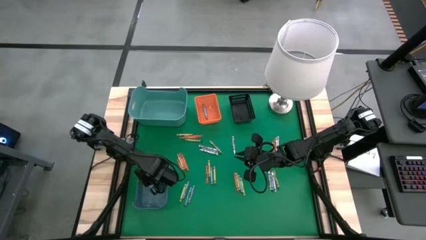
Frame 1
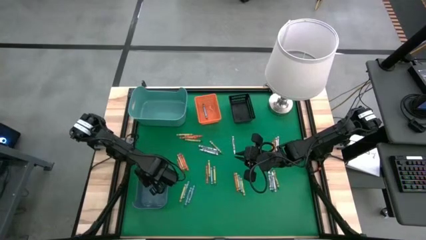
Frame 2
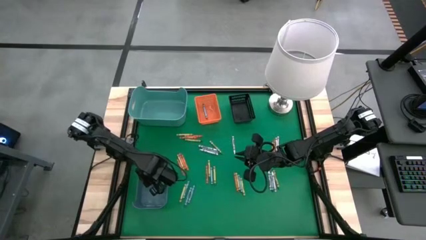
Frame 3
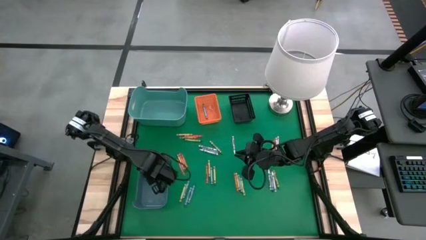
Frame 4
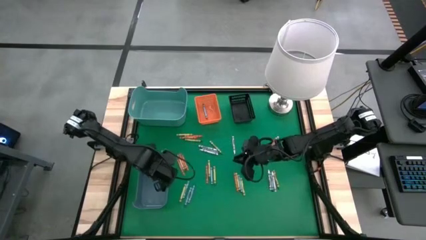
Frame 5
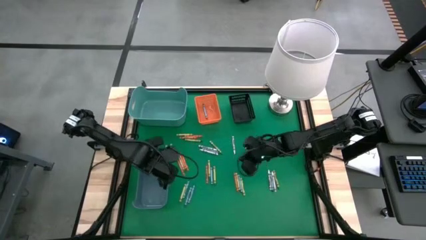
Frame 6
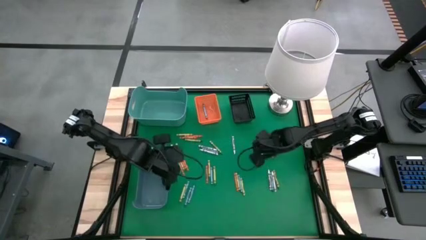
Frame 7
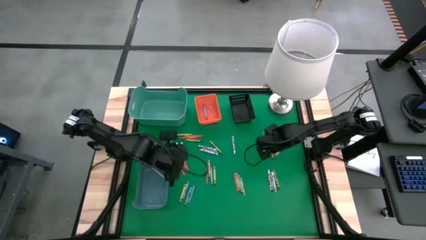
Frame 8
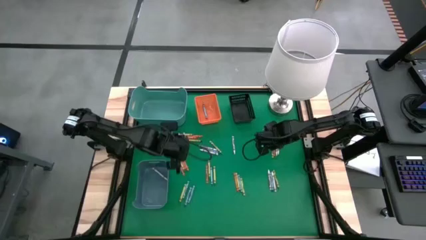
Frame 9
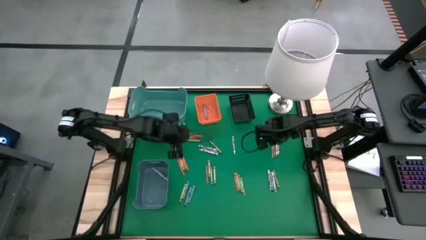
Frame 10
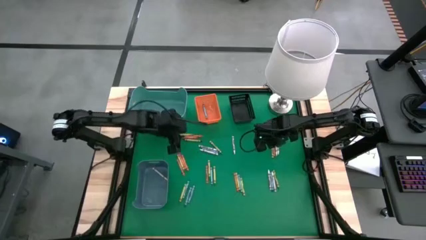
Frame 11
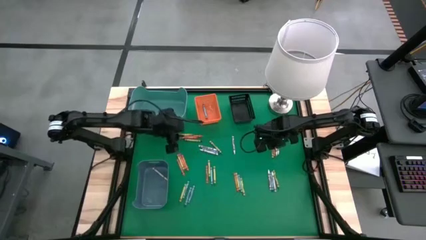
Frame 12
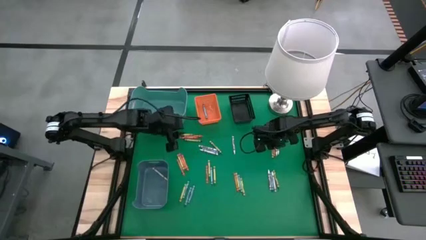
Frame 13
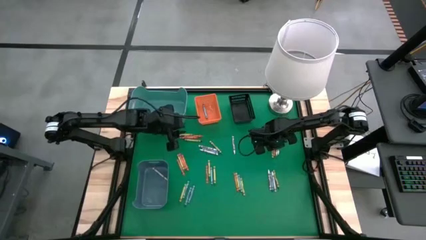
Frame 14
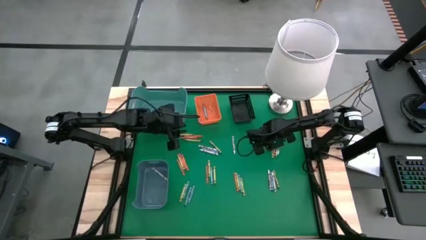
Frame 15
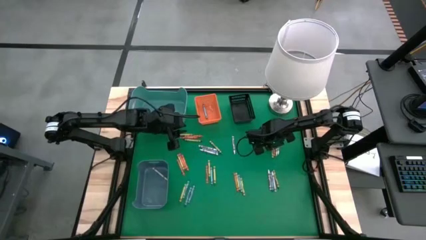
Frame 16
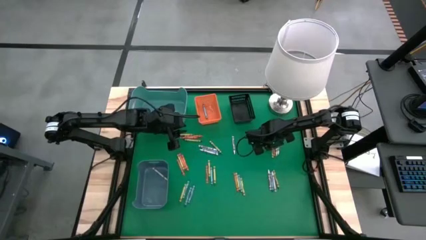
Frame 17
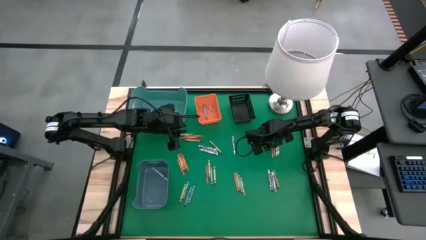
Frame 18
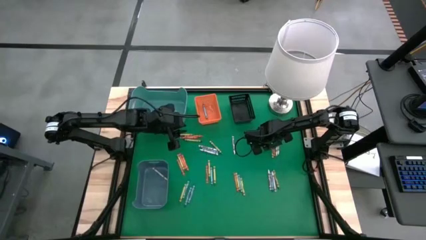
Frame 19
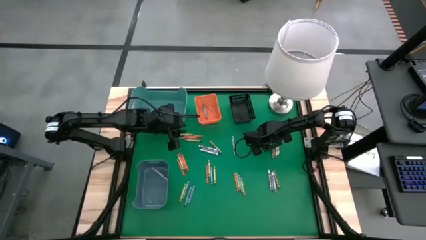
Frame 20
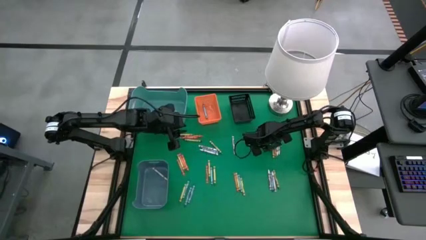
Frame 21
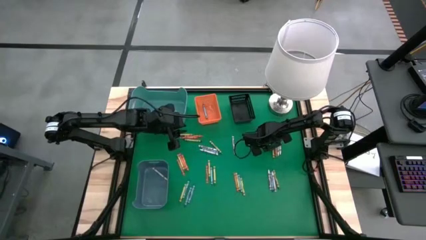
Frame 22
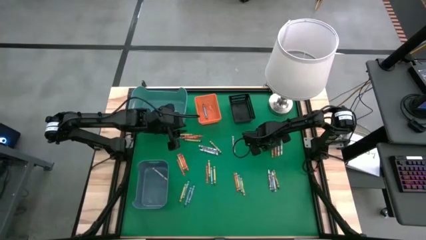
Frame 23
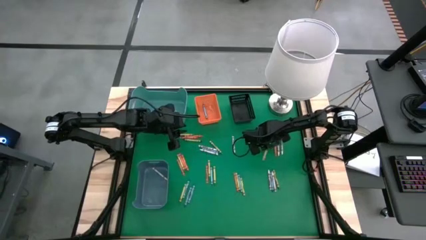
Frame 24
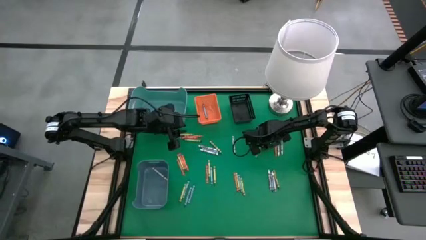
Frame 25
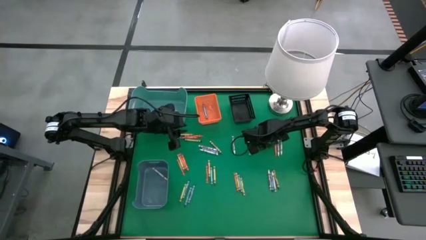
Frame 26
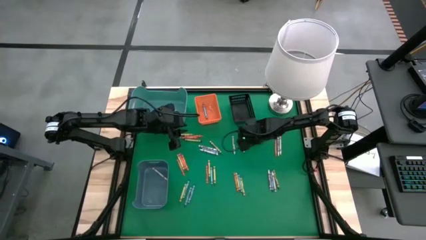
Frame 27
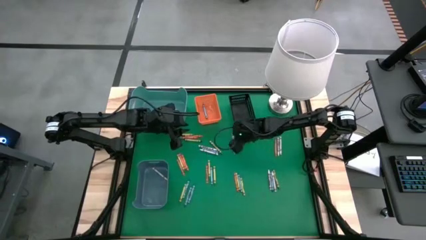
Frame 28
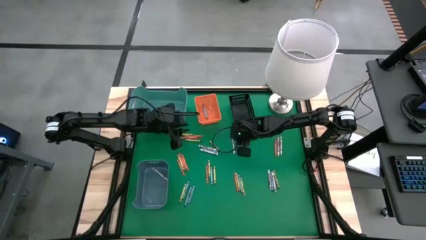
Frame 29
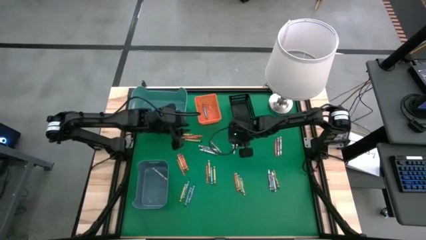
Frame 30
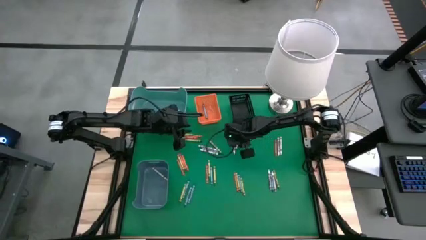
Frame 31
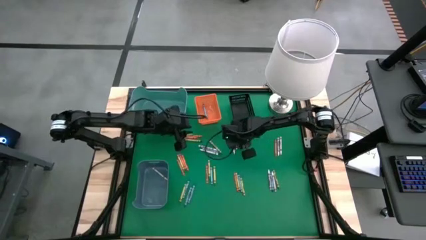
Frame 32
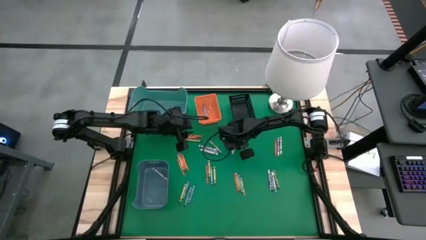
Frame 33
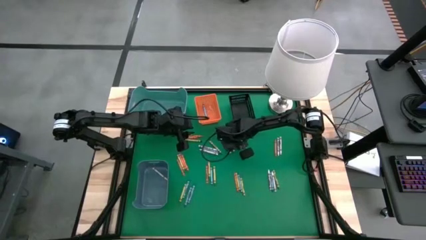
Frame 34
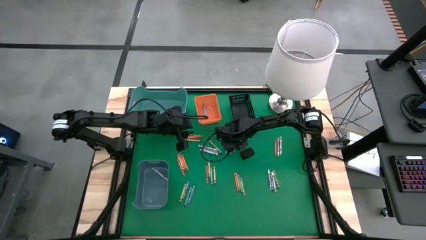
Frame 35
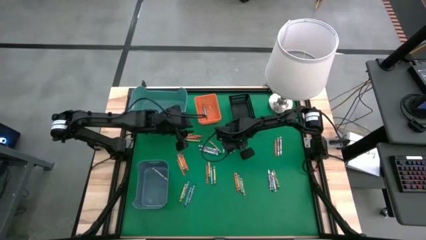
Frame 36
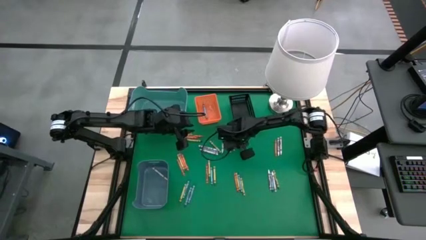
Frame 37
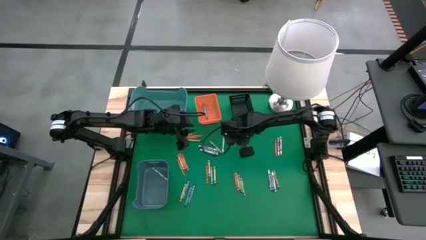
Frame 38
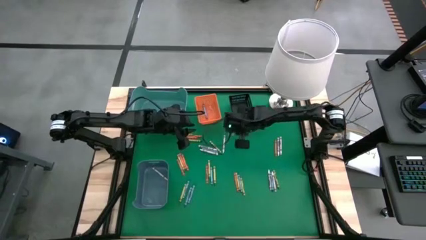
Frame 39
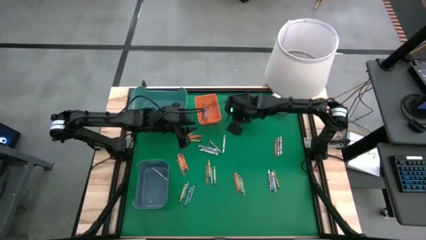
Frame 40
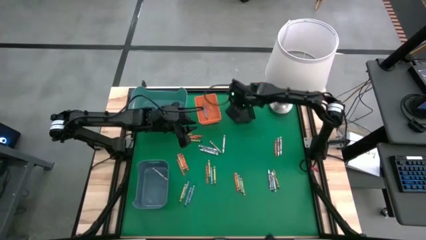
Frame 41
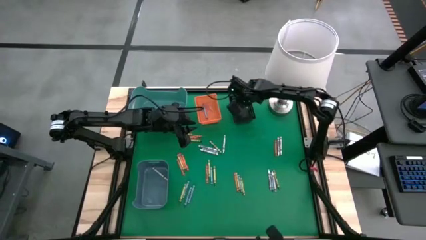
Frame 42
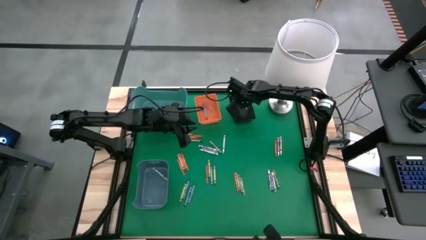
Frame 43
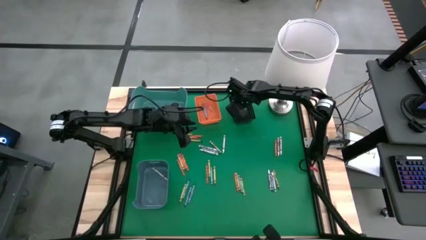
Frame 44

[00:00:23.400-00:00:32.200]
Task: Sort crayons
Put the green crayon into the black bin

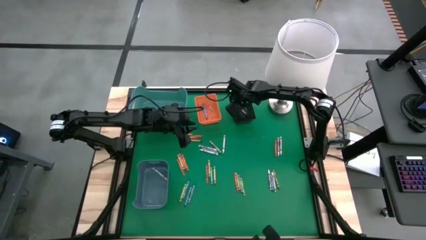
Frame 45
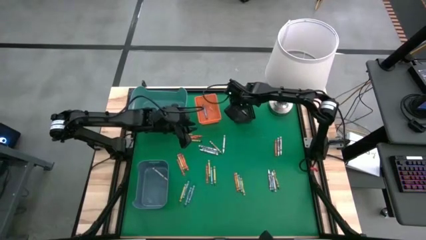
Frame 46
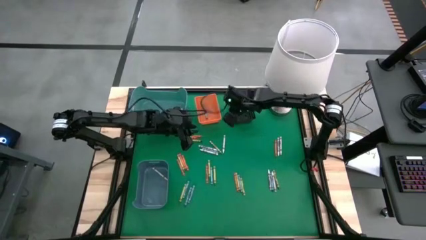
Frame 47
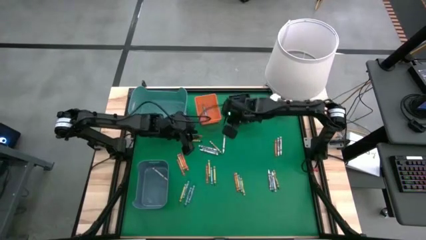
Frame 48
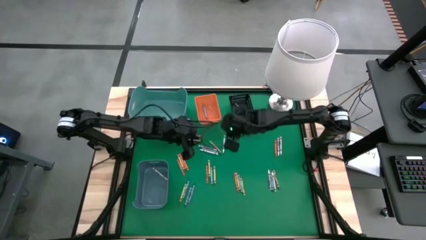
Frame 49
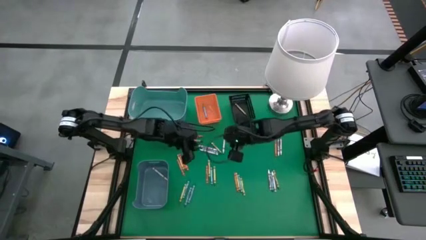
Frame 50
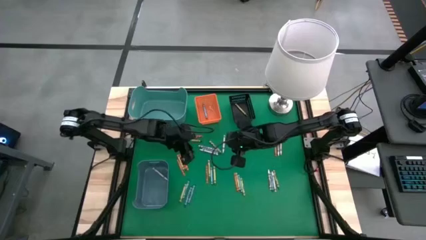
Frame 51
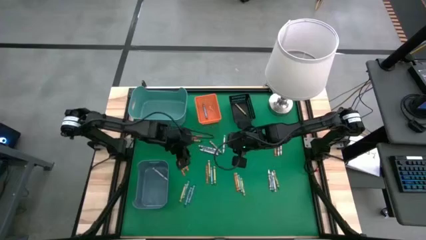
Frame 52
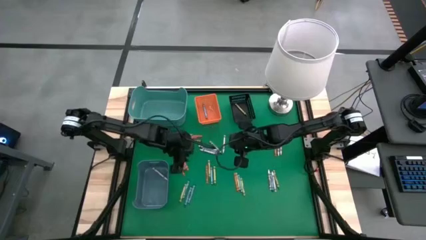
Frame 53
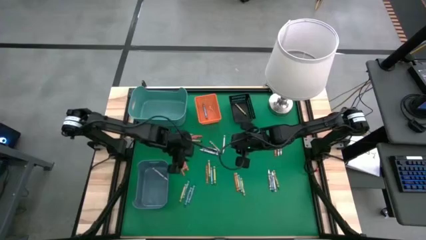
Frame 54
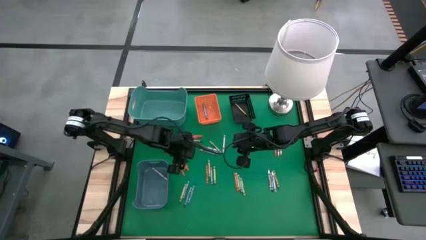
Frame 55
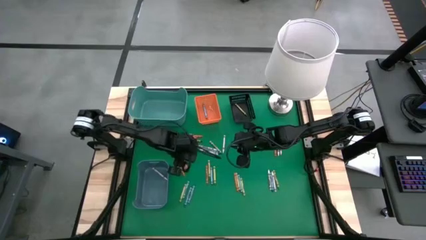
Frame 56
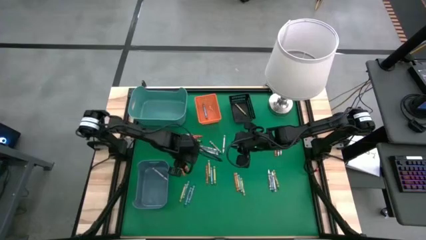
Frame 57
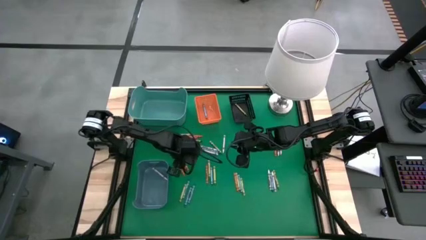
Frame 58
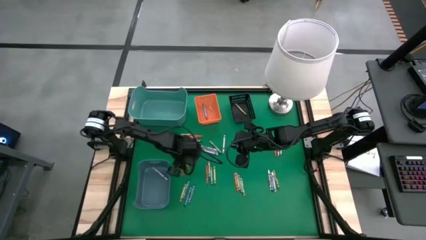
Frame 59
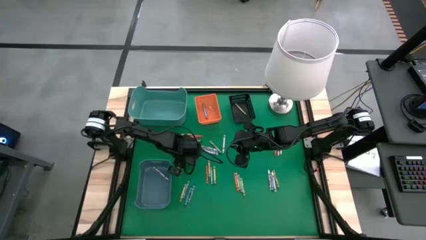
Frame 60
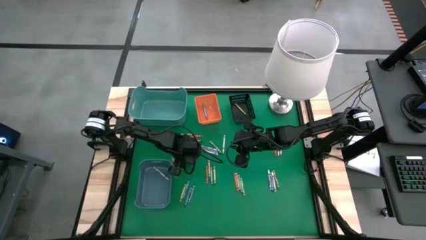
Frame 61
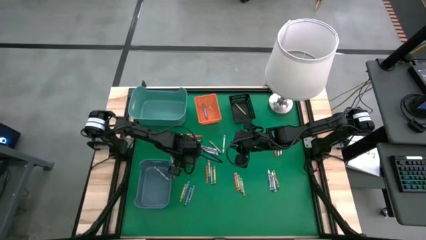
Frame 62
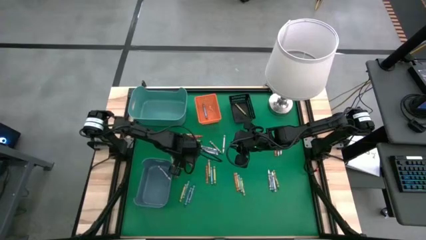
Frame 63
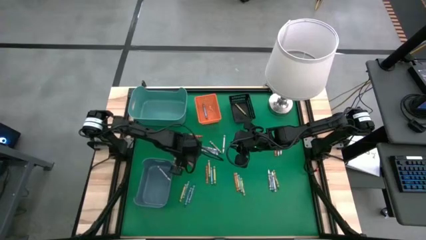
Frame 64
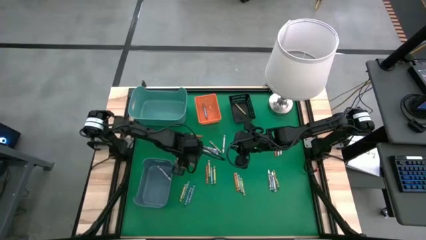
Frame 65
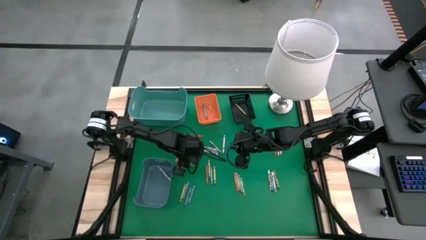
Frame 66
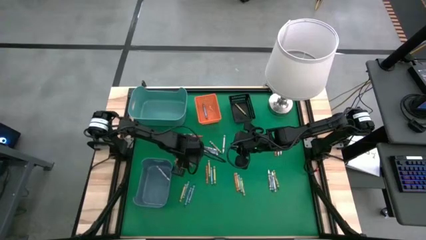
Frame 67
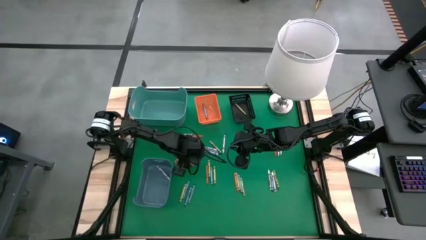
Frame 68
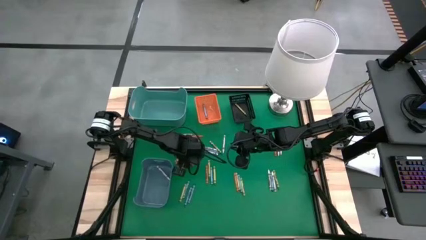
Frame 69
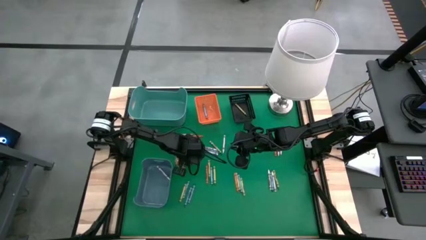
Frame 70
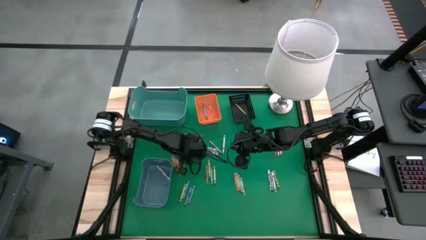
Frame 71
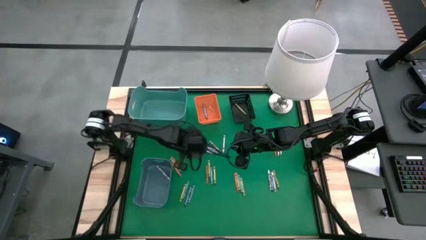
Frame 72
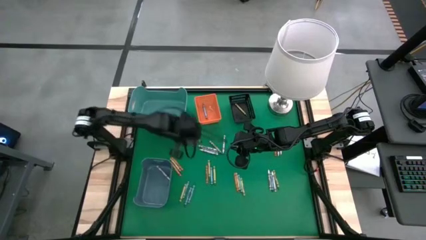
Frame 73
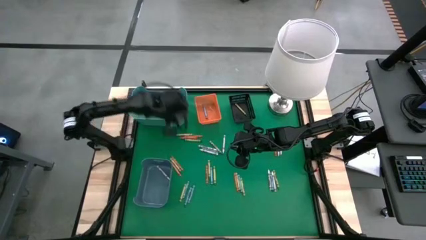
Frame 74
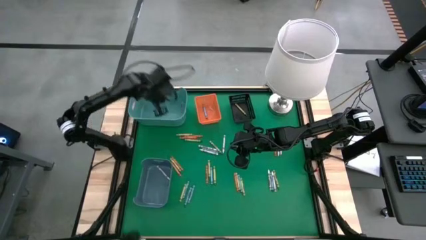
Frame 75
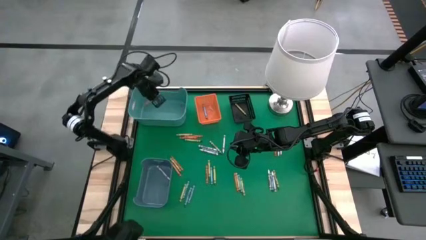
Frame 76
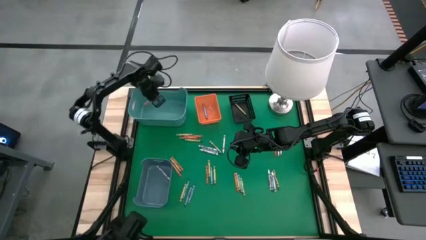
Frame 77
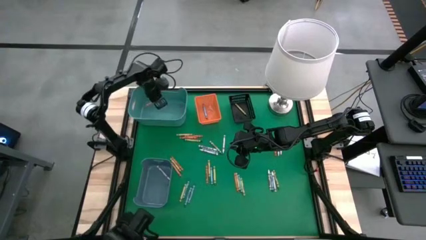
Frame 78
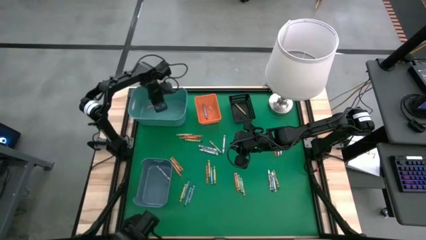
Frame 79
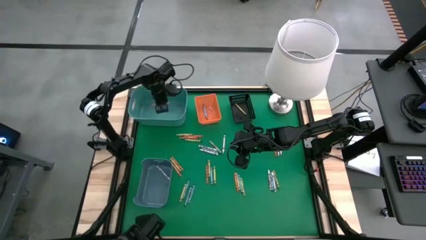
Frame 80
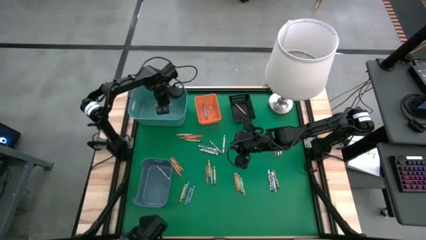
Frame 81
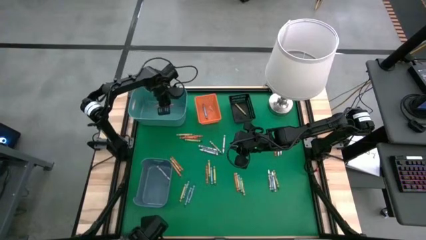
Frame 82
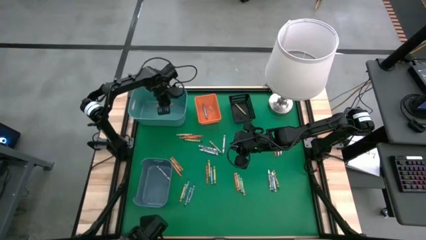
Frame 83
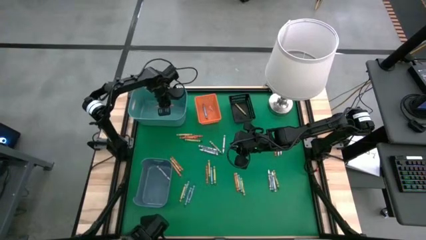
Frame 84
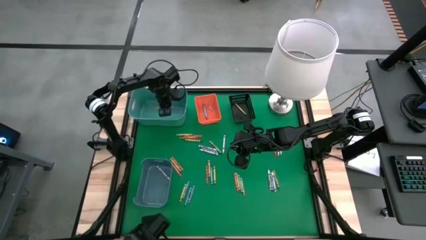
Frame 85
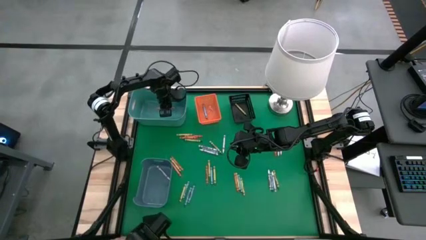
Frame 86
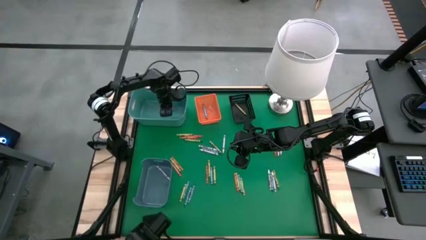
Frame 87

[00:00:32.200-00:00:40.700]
Put the orange crayon into the green bin
